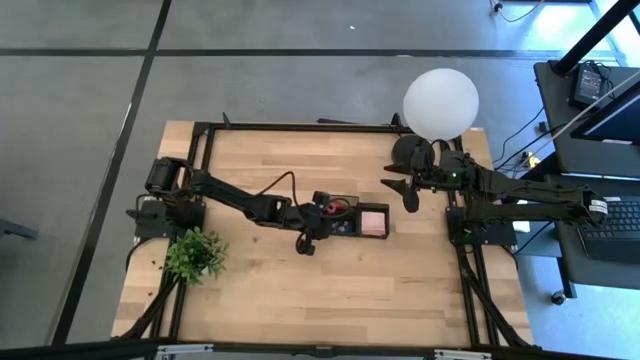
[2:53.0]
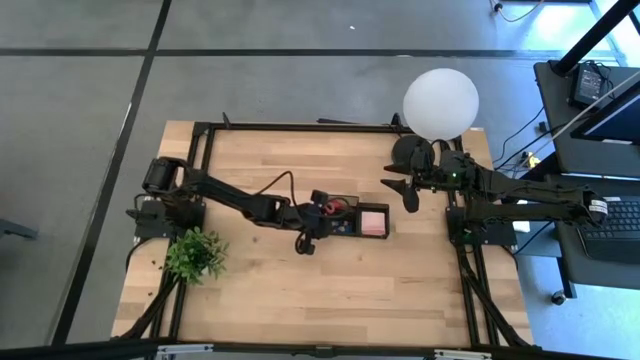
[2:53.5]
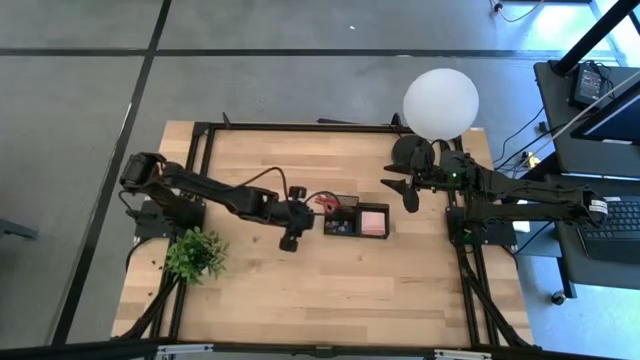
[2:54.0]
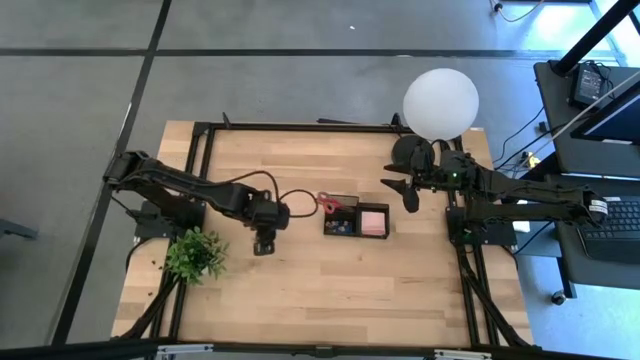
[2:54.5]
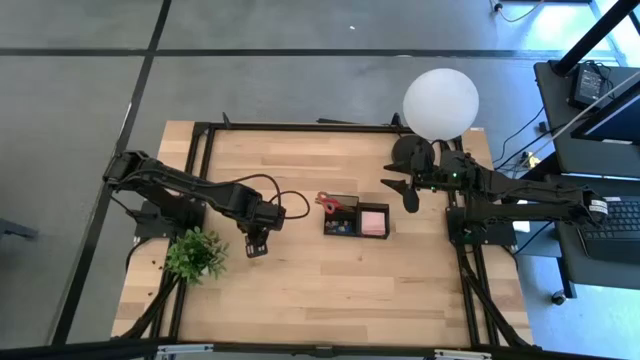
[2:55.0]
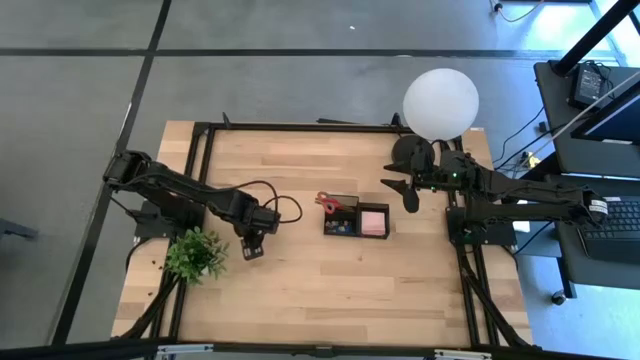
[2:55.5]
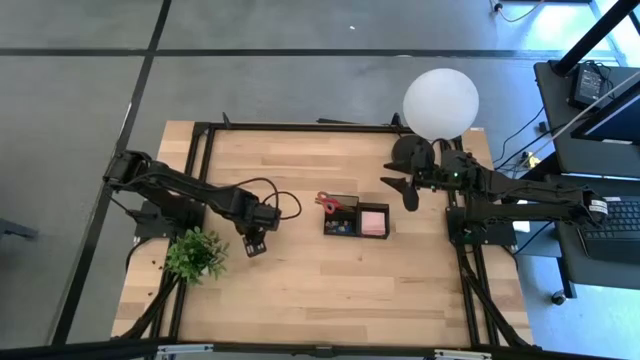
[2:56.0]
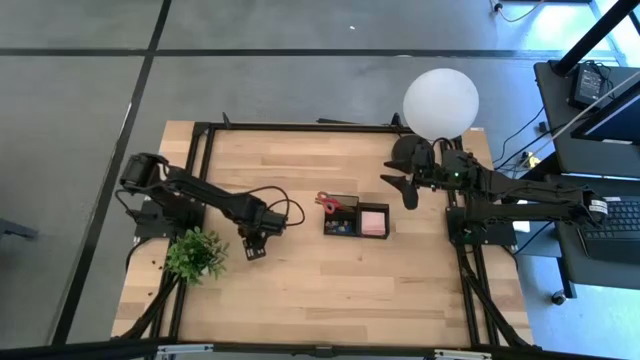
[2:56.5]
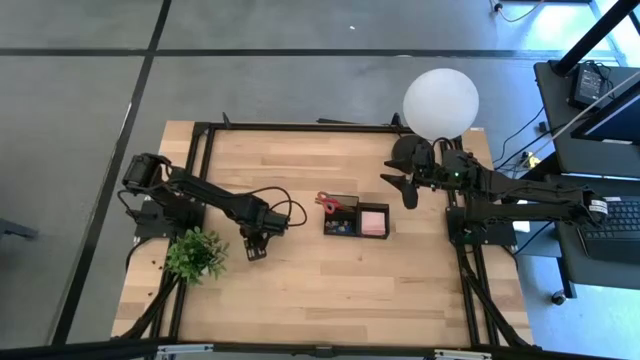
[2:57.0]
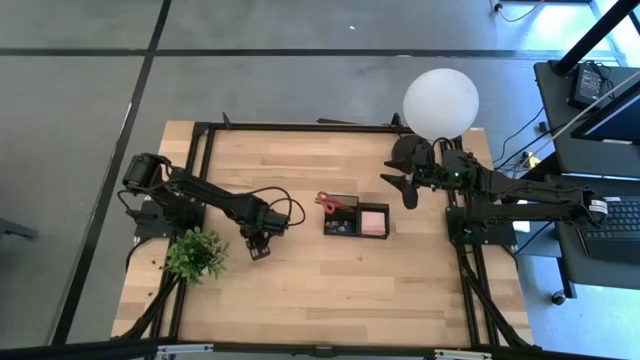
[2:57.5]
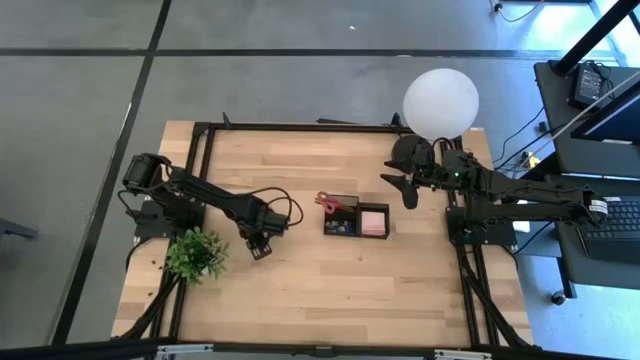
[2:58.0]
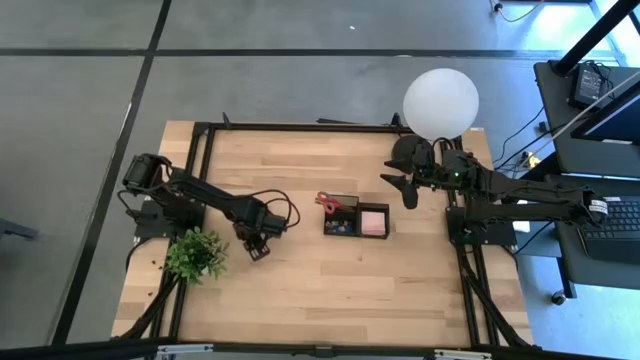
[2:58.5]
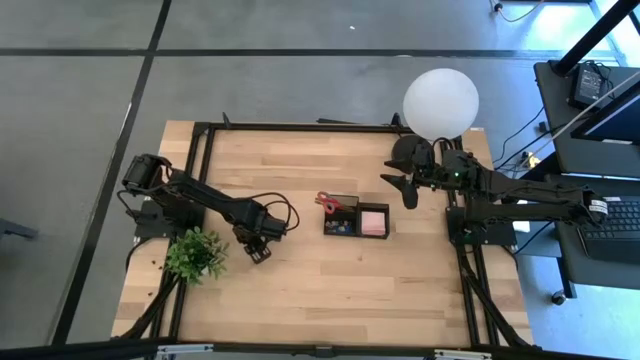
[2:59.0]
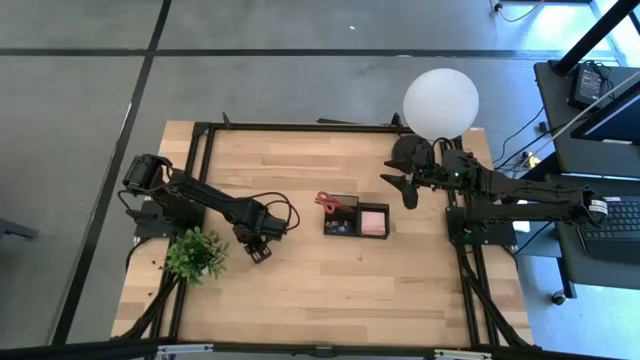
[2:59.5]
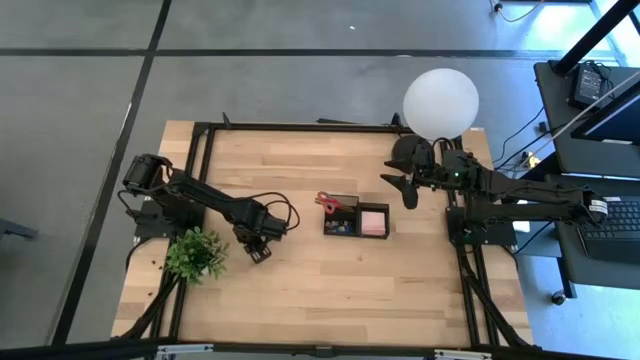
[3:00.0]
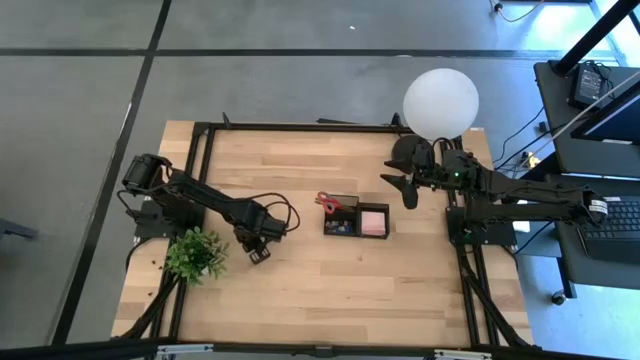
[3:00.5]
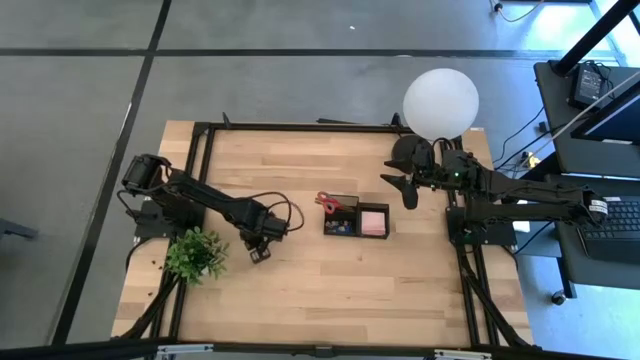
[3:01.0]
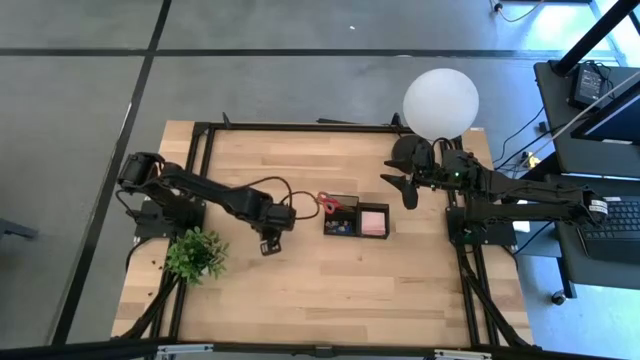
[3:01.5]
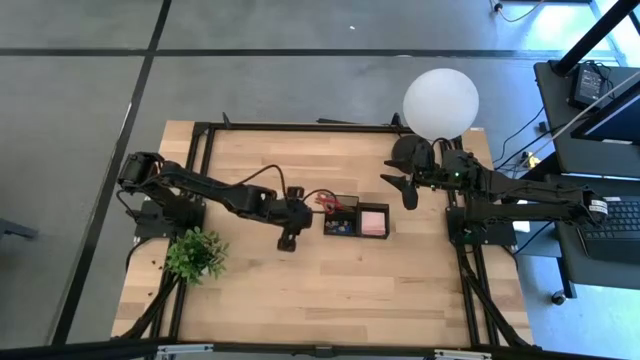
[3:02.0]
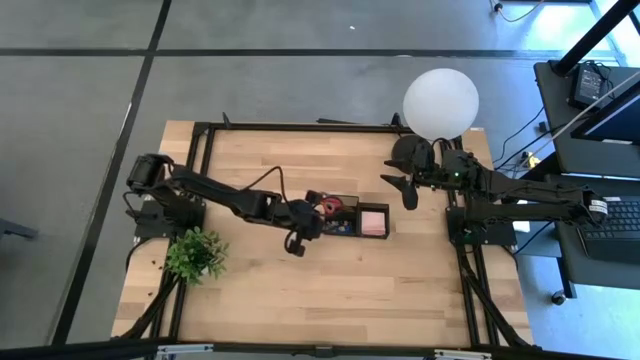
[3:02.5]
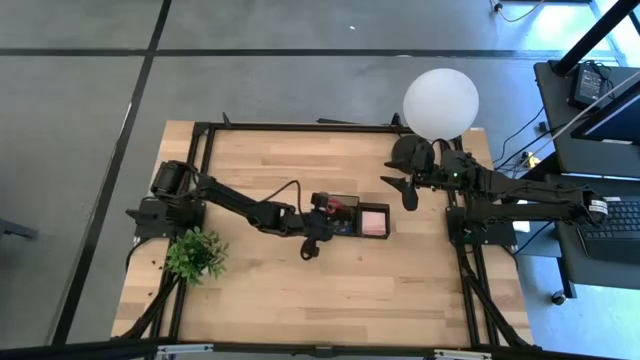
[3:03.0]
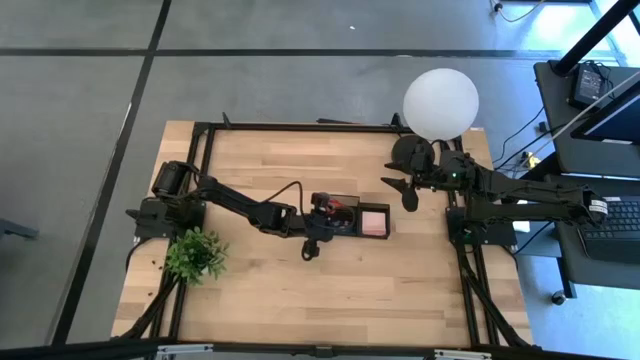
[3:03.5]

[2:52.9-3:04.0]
Task: Pick and place office supplies into organizer
Put the blue binder clip into the black desk organizer

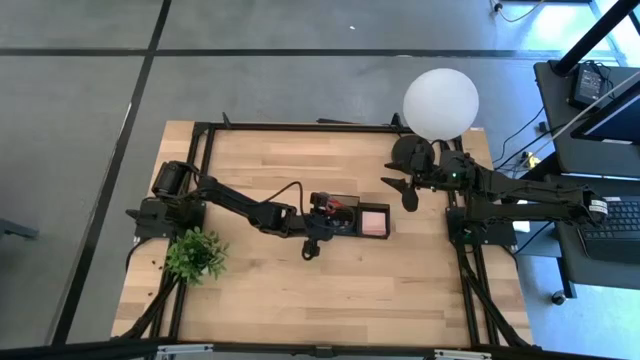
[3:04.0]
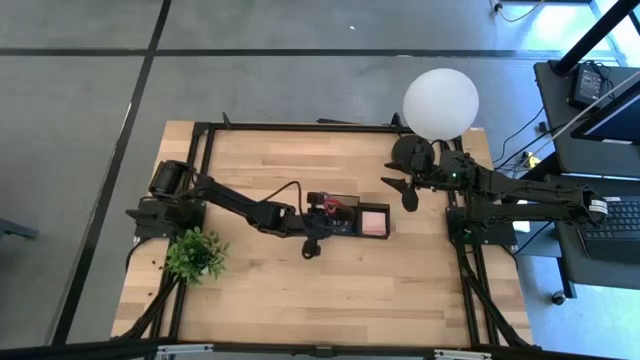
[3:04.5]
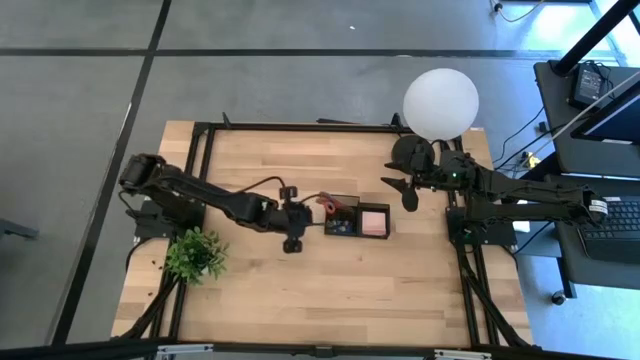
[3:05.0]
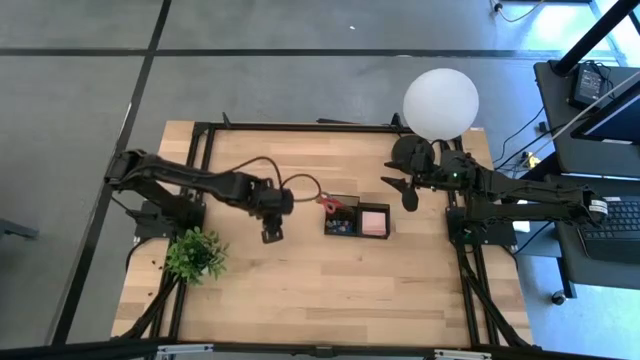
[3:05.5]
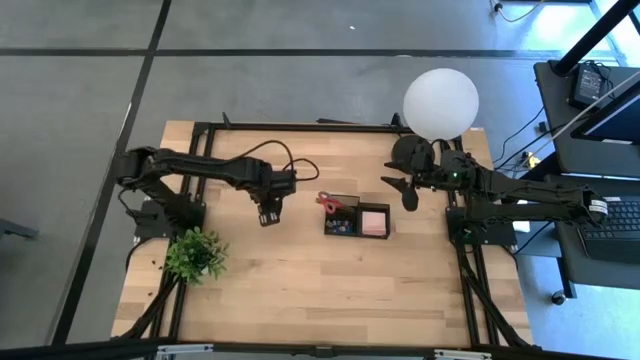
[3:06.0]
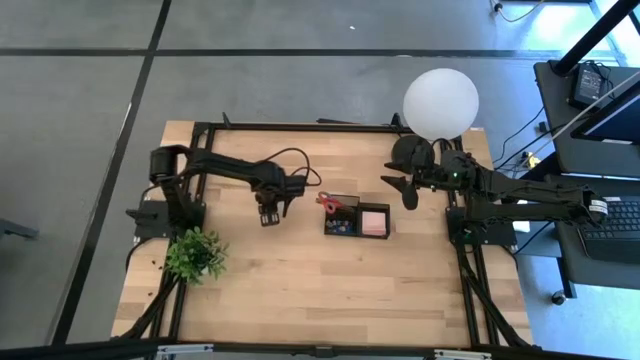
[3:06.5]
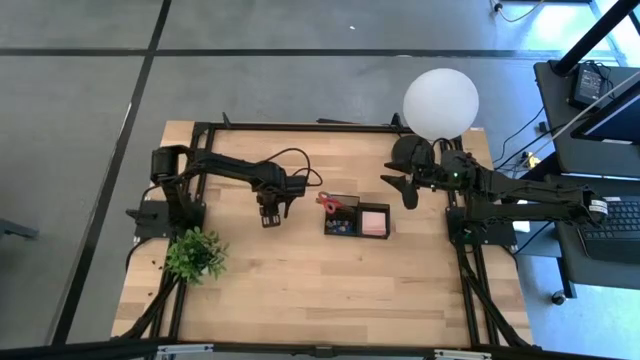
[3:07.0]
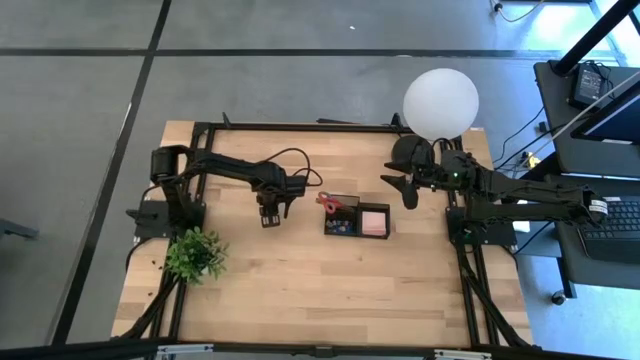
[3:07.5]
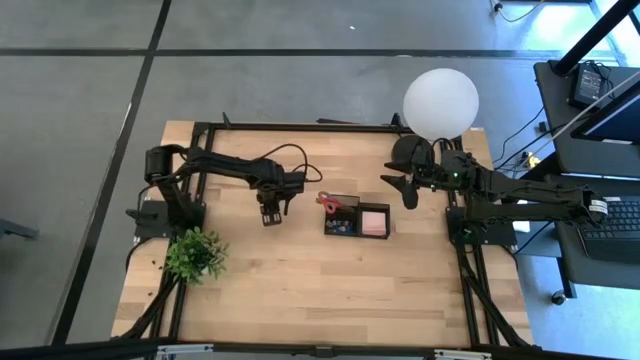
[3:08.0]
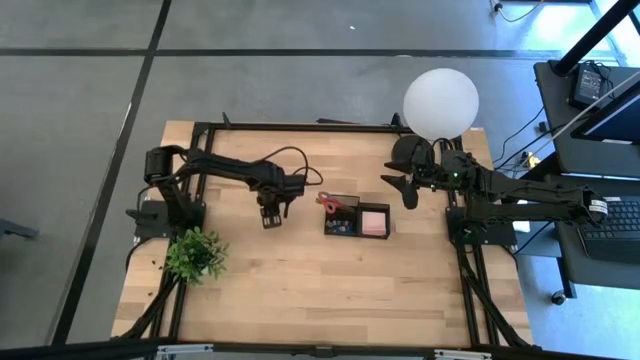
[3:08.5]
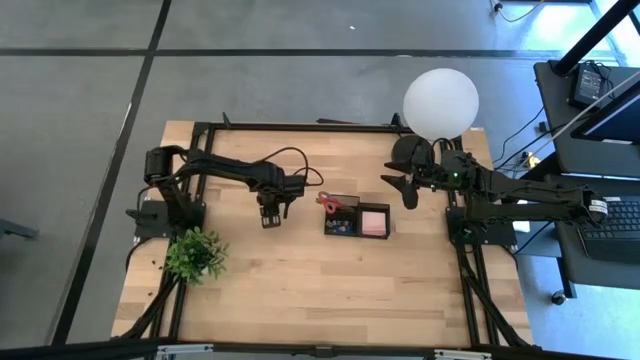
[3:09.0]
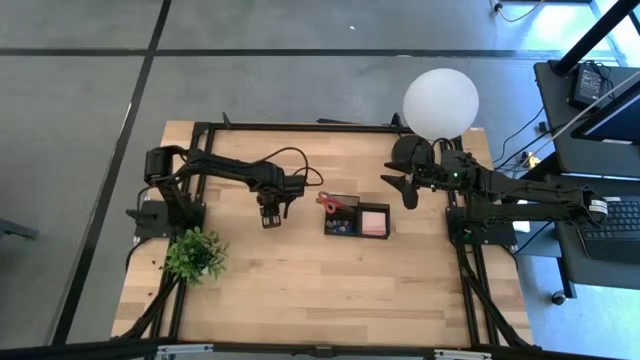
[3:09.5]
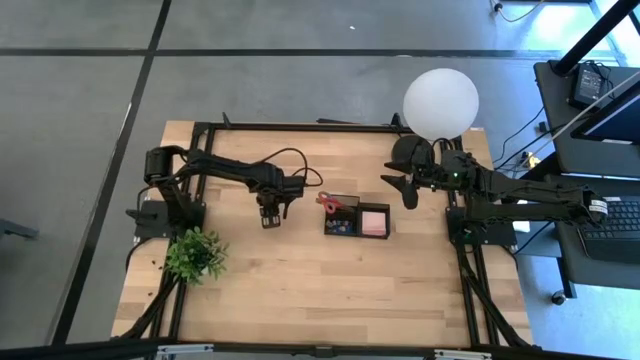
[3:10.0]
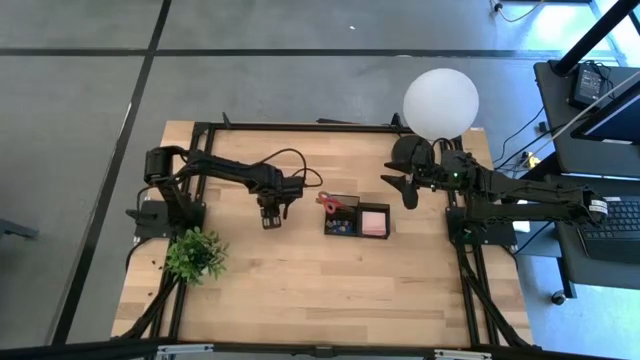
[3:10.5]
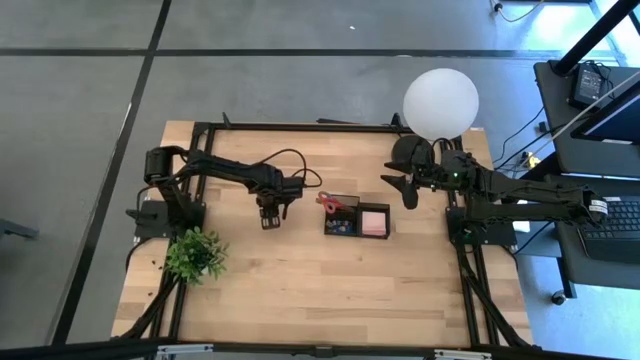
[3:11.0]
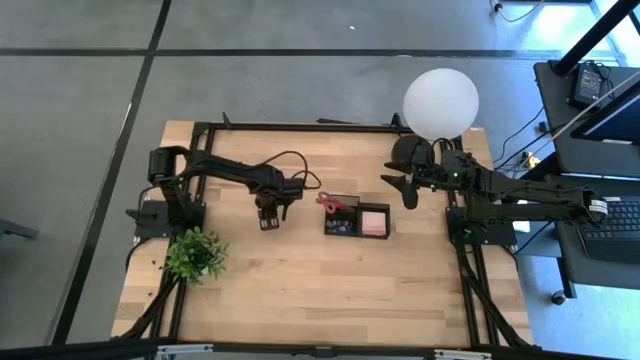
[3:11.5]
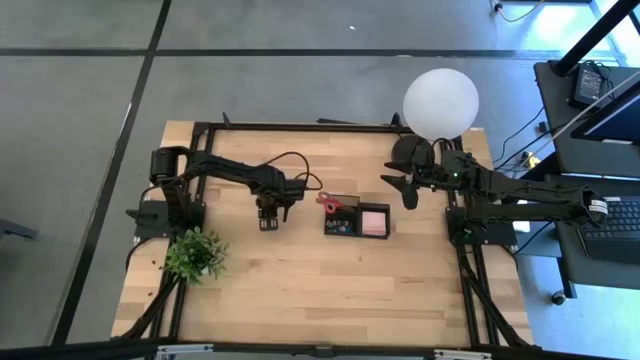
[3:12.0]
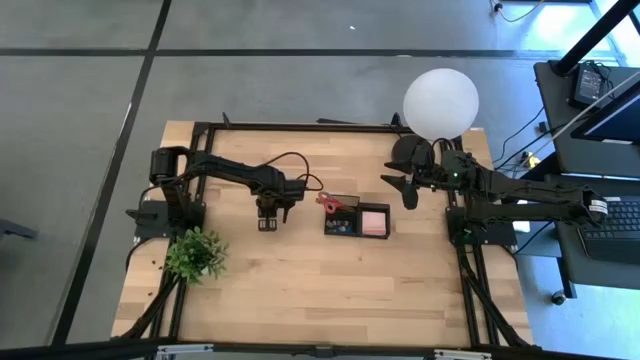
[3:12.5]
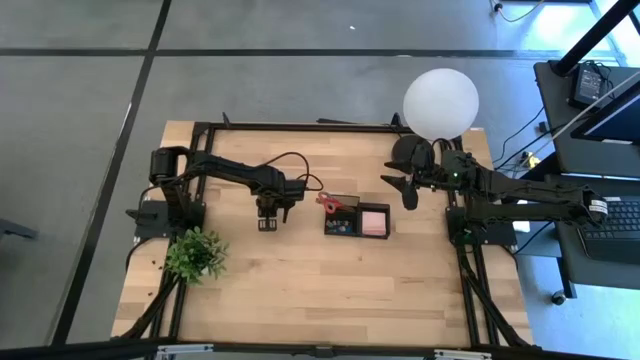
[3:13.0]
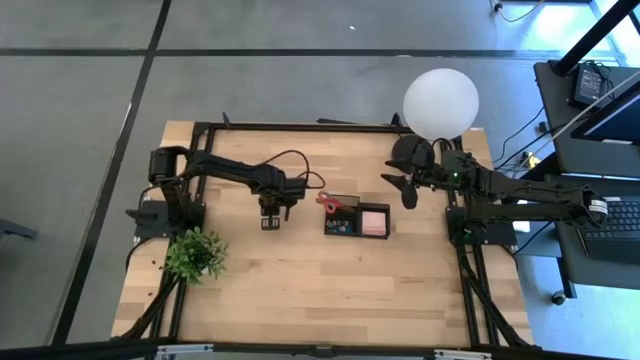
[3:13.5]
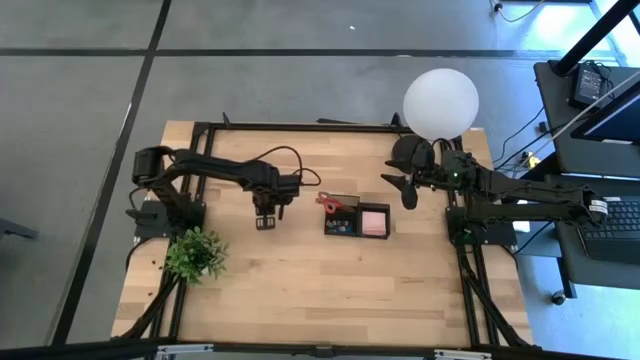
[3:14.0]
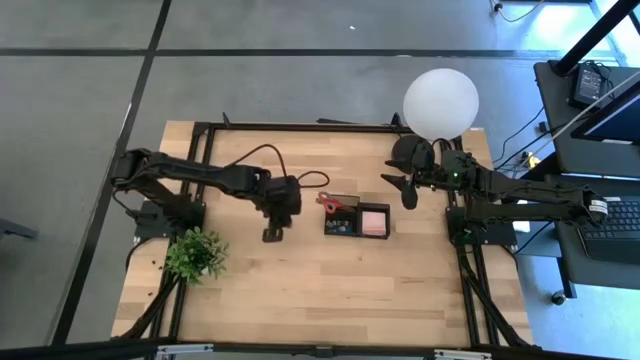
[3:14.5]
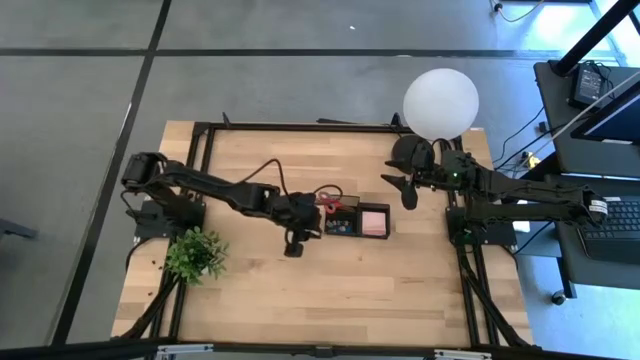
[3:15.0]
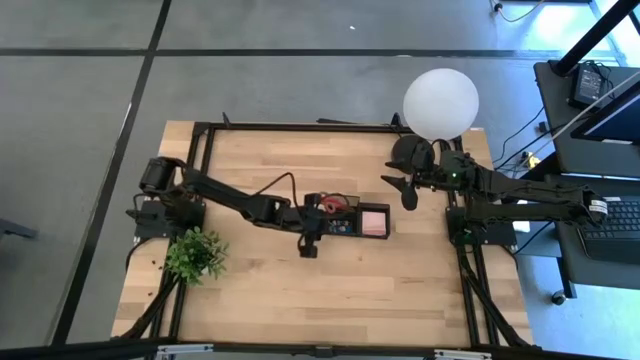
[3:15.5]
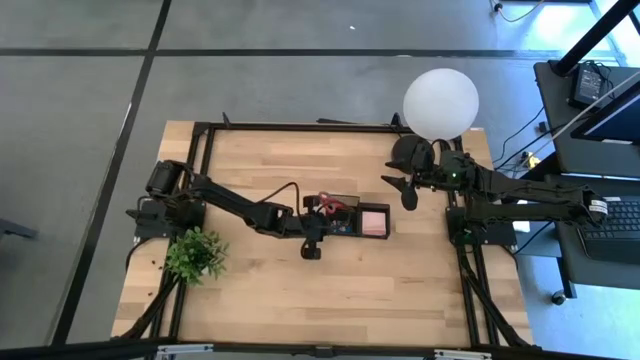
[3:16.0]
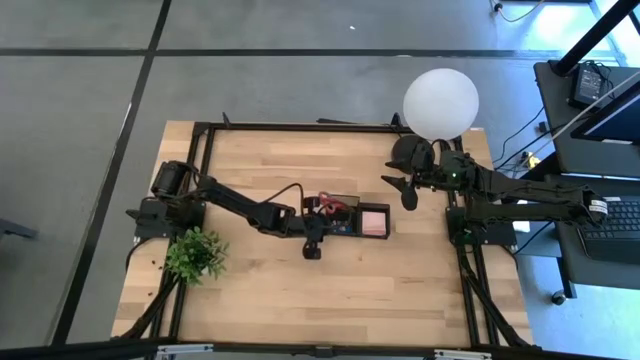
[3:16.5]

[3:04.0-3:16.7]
Put the blue binder clip into the black desk organizer
